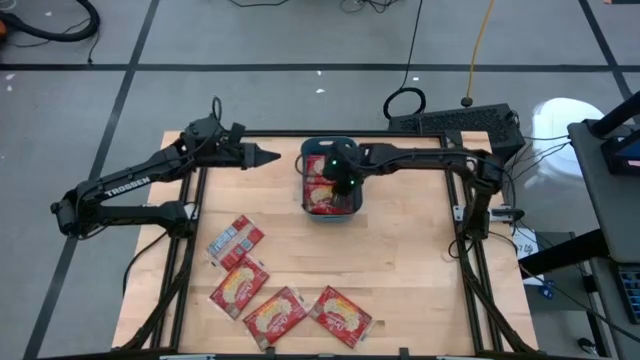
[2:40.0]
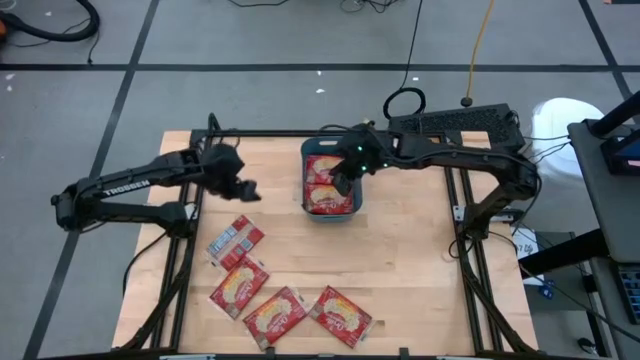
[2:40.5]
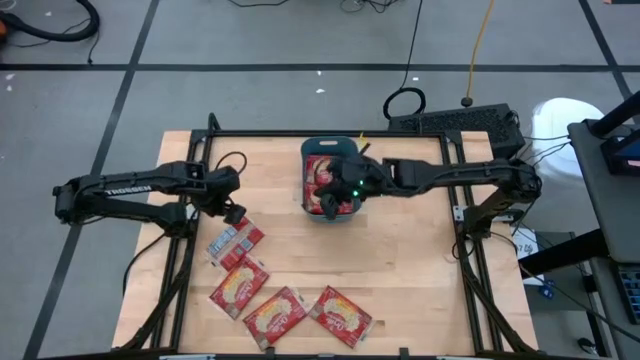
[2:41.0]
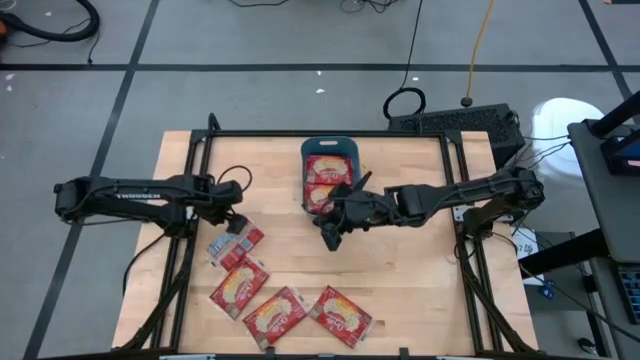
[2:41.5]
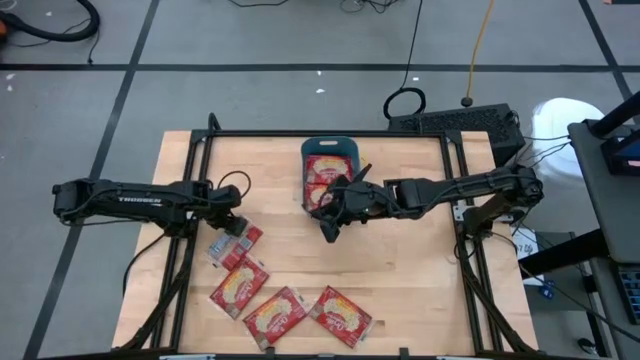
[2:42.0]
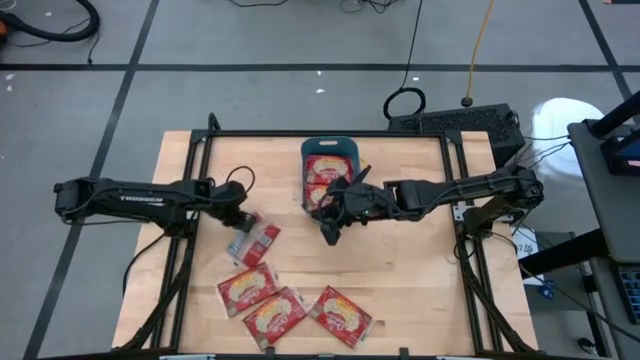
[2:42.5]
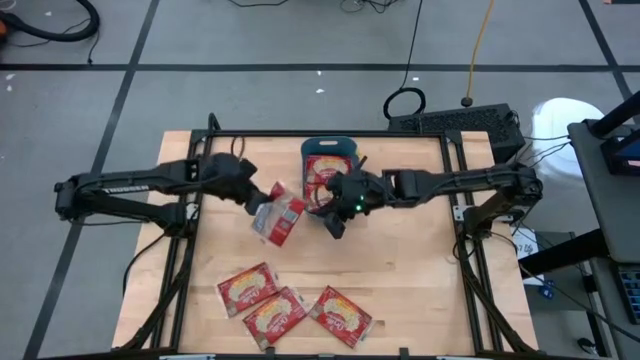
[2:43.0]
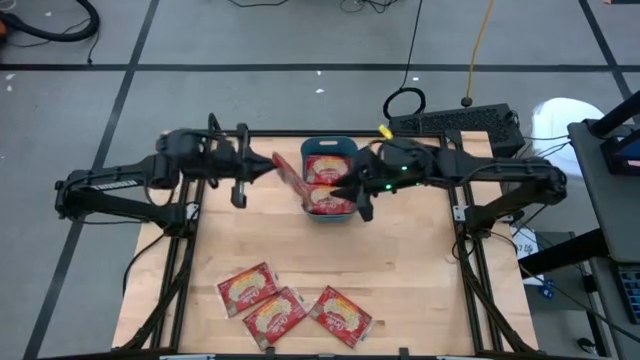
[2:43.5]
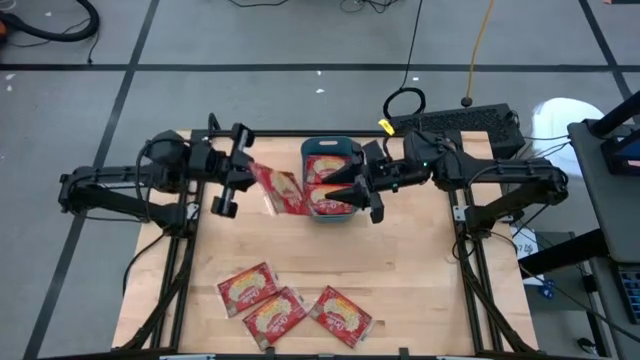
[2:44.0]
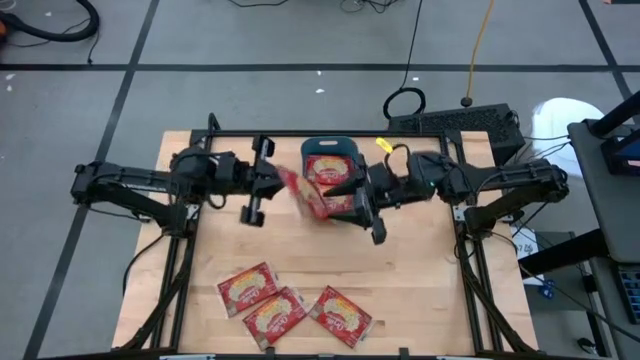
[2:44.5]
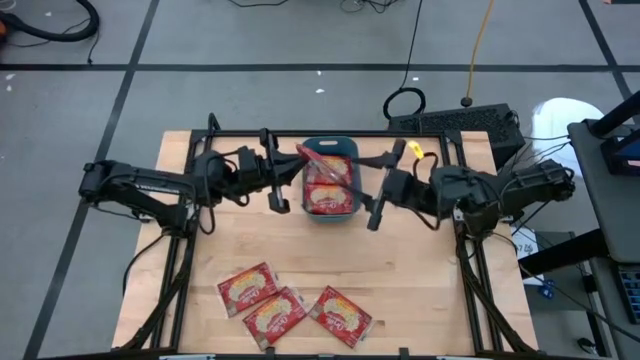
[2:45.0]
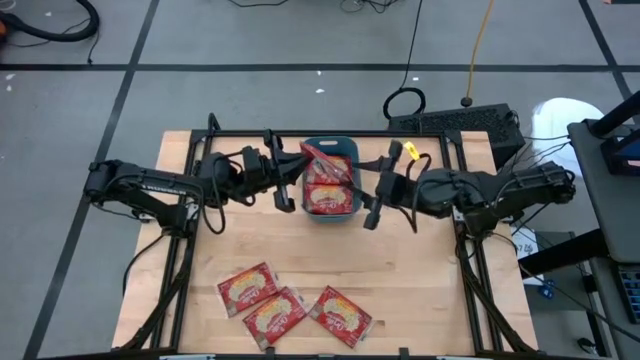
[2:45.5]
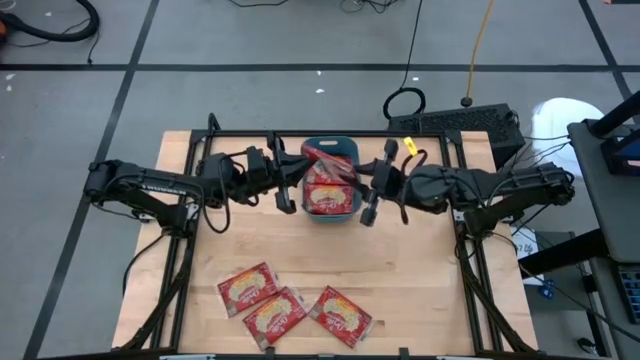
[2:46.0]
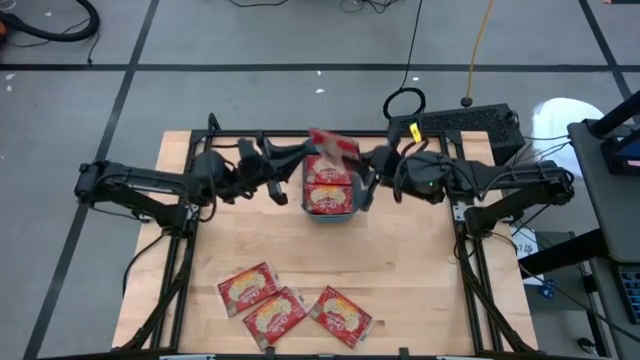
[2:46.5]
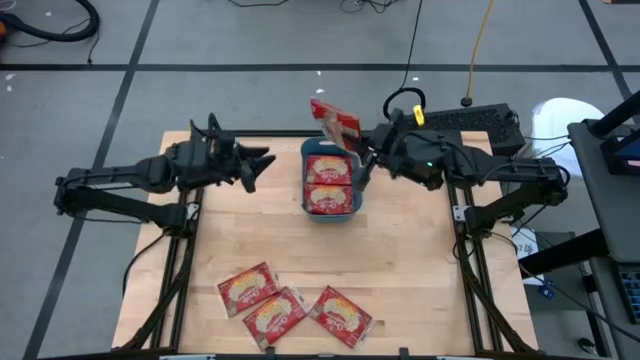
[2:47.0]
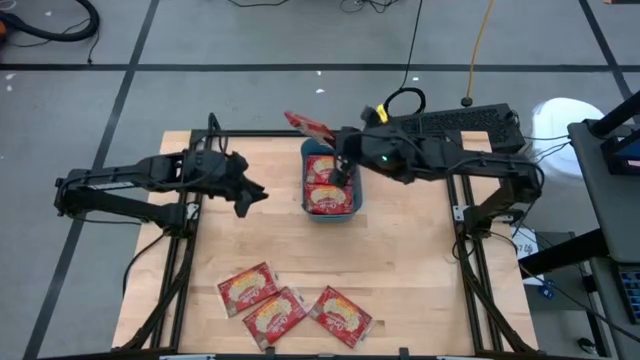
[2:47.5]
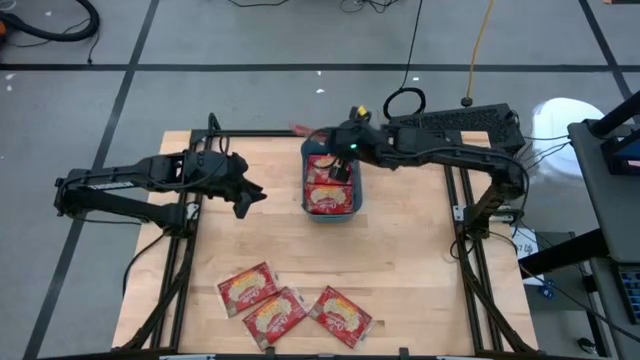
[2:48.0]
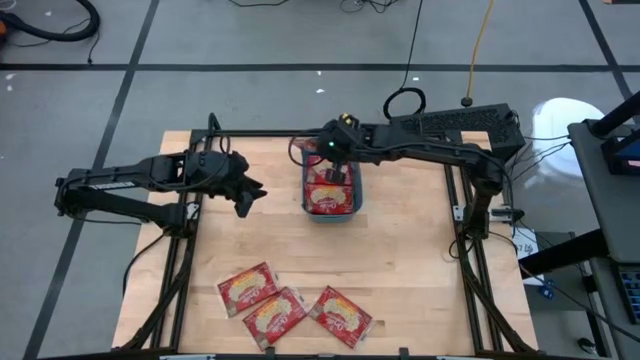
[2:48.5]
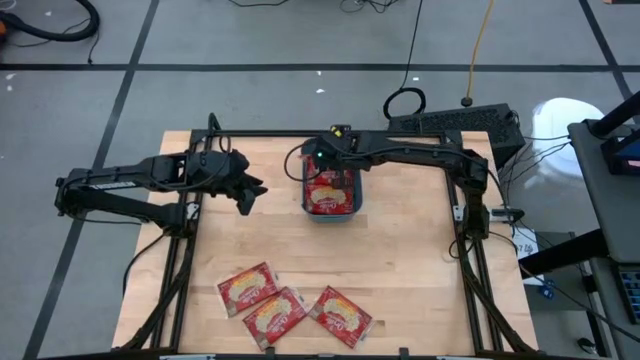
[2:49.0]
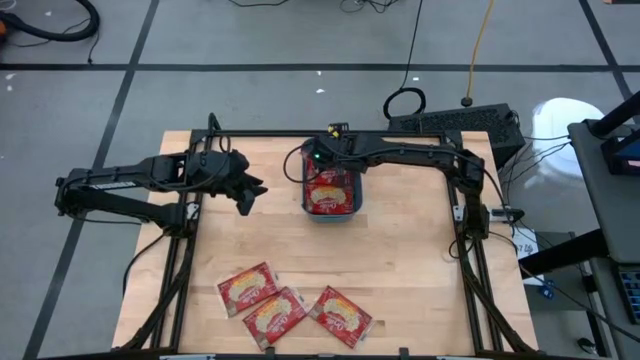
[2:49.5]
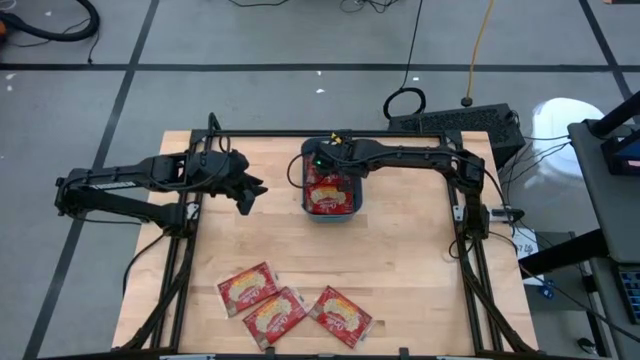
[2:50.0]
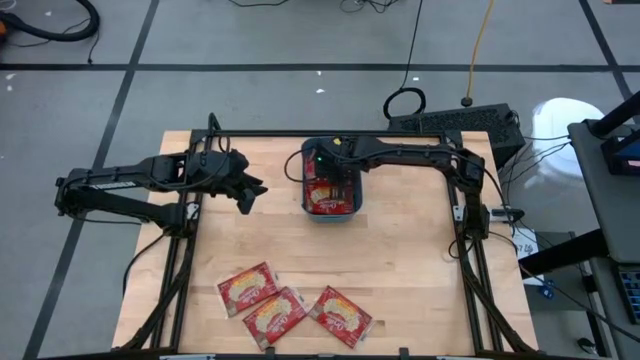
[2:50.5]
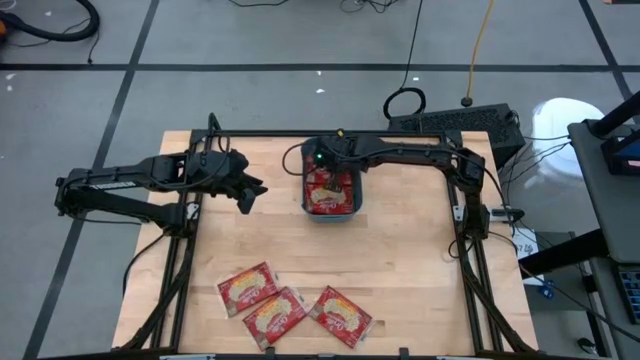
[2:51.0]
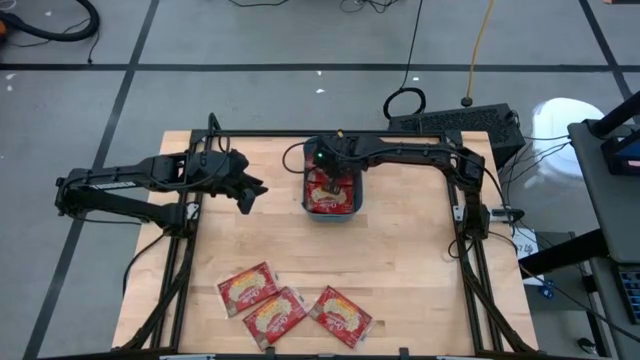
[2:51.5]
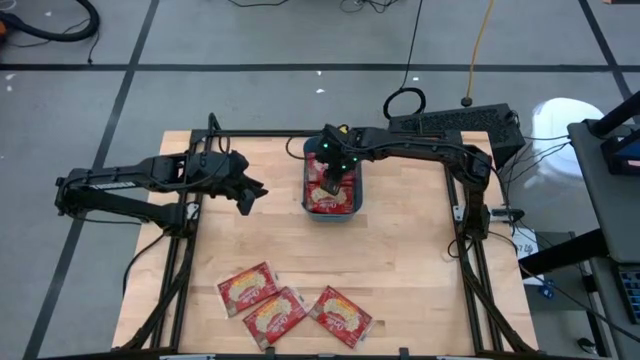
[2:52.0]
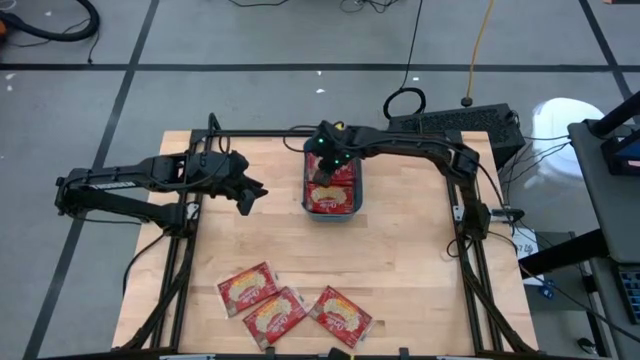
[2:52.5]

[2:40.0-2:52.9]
Task: Sort popcorn bags into baskets
Put the red popcorn bag into the blue bin

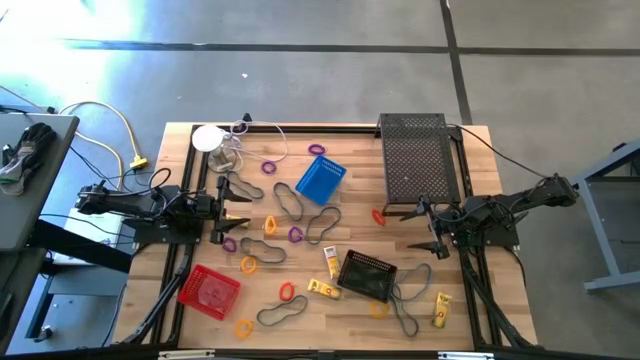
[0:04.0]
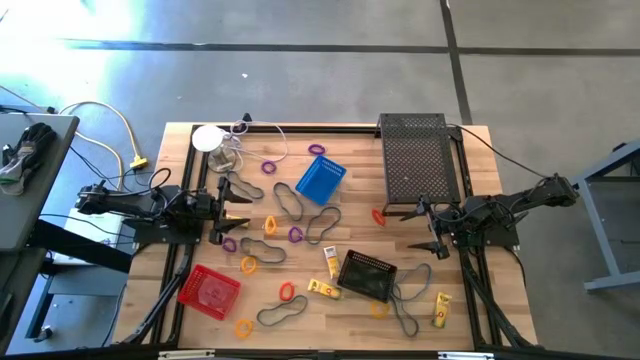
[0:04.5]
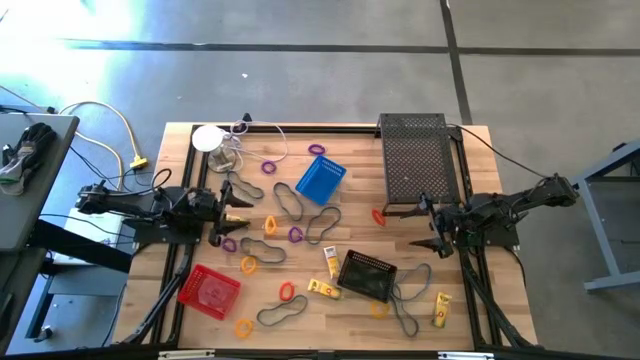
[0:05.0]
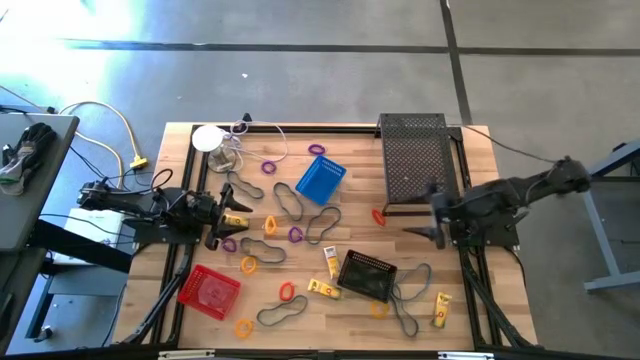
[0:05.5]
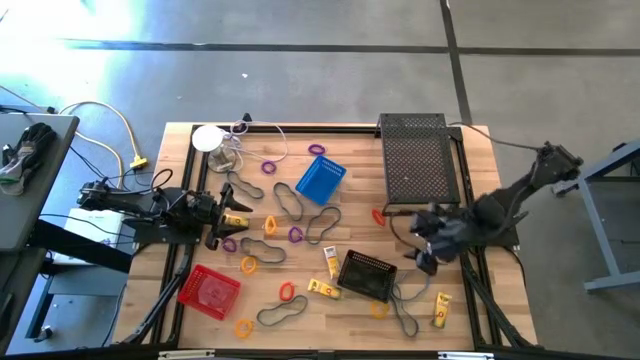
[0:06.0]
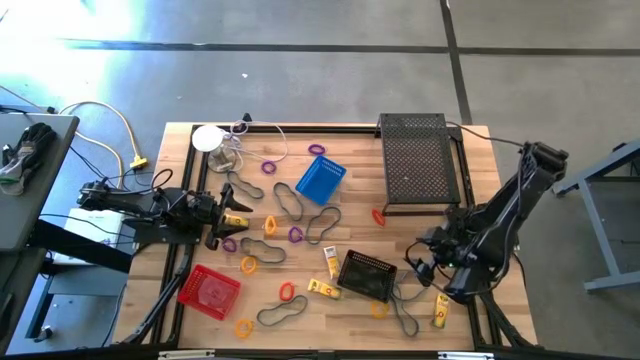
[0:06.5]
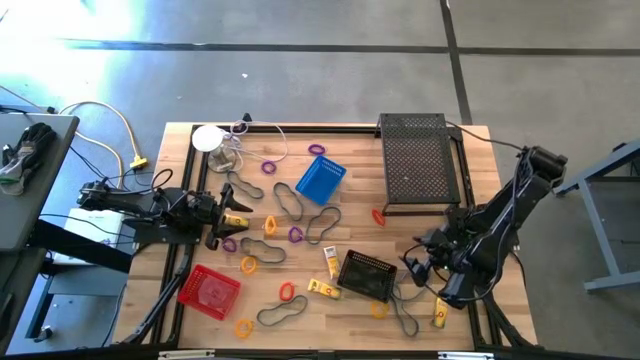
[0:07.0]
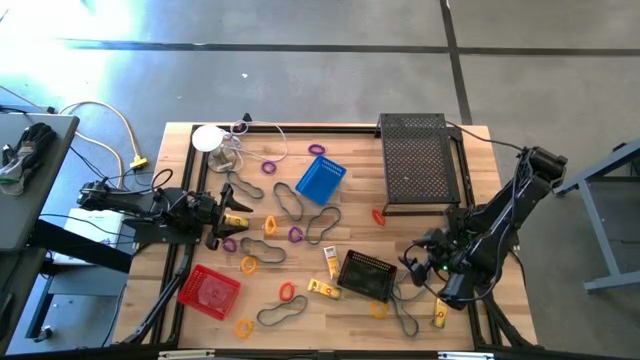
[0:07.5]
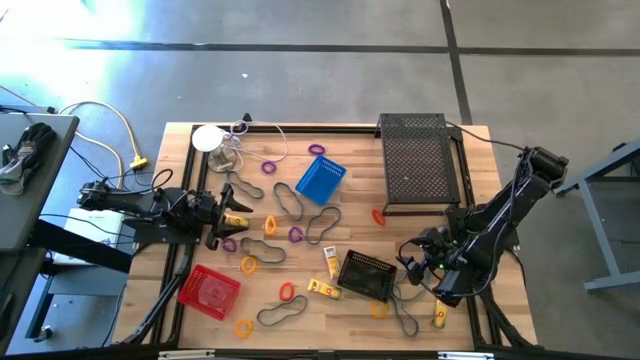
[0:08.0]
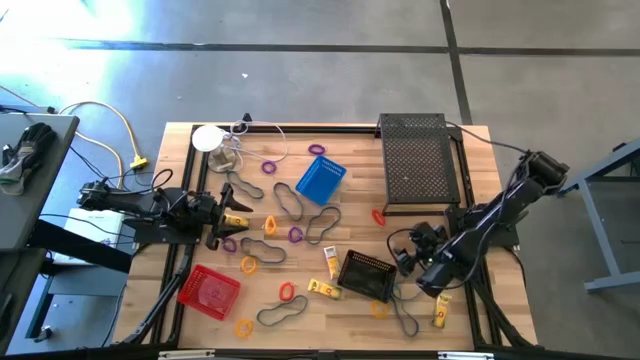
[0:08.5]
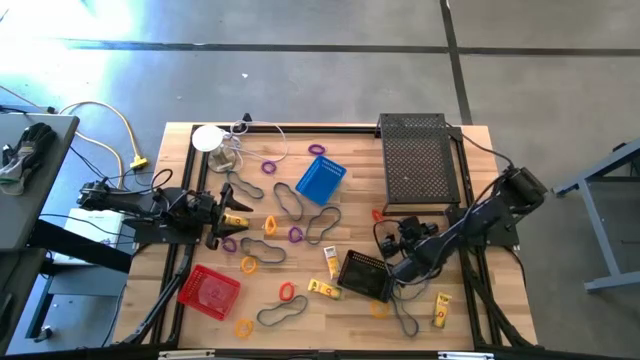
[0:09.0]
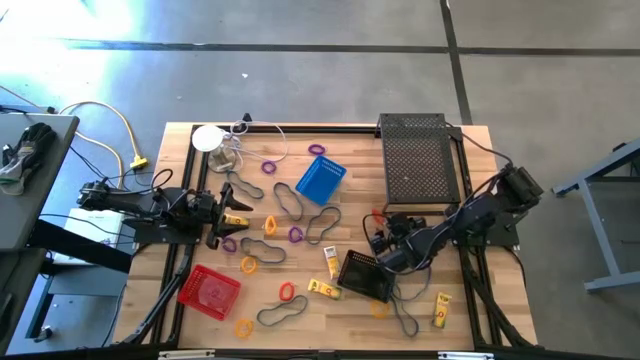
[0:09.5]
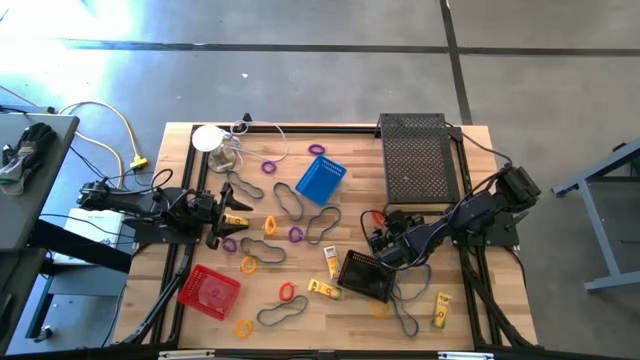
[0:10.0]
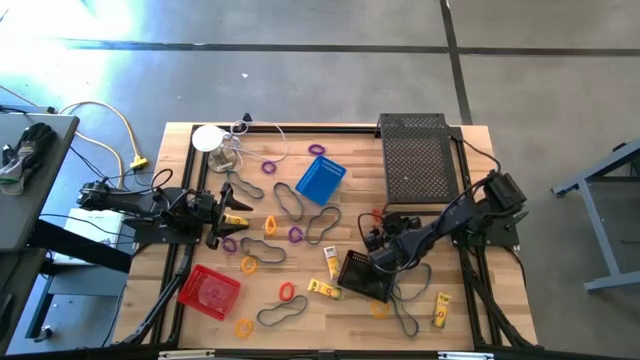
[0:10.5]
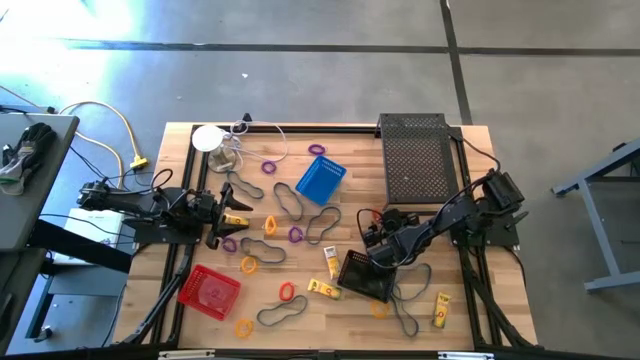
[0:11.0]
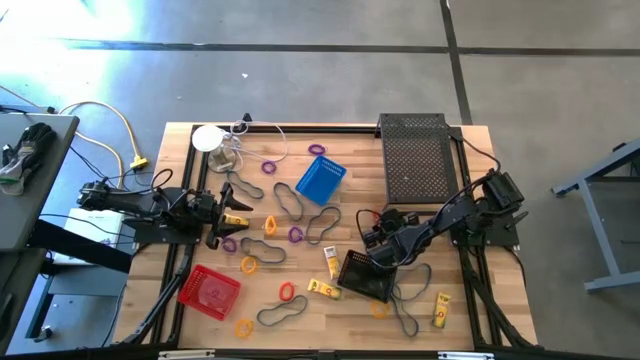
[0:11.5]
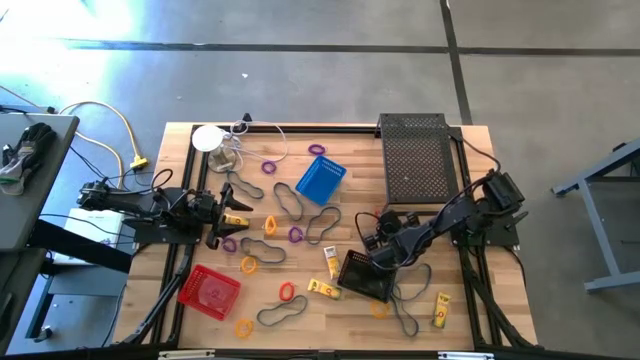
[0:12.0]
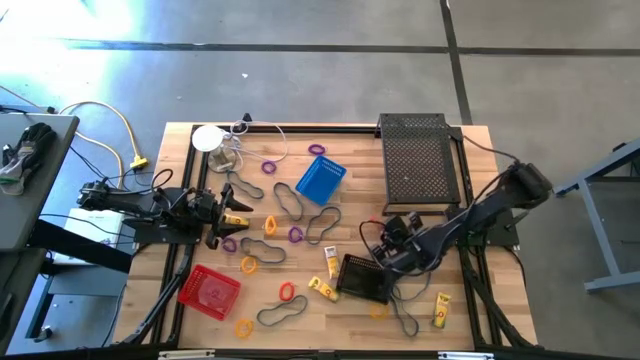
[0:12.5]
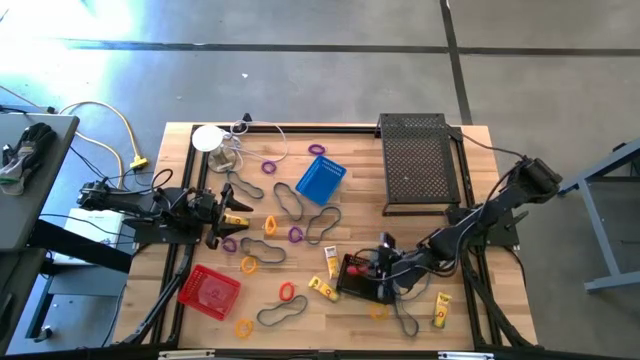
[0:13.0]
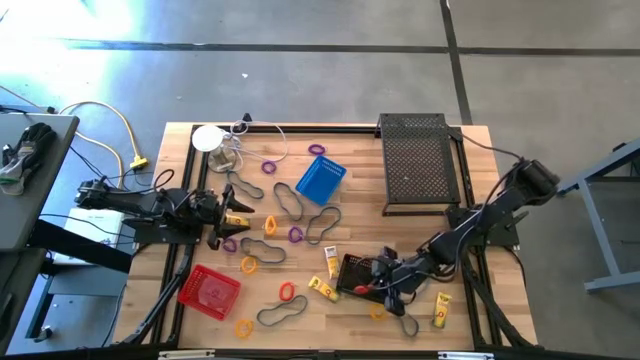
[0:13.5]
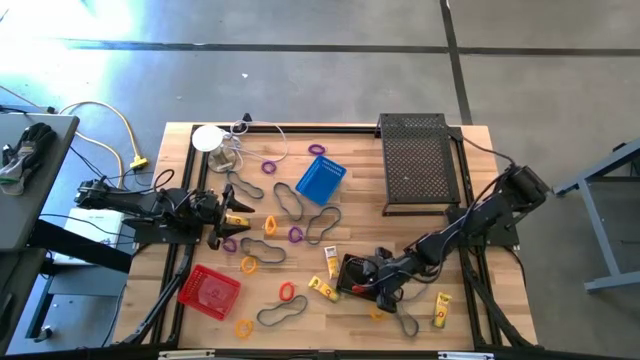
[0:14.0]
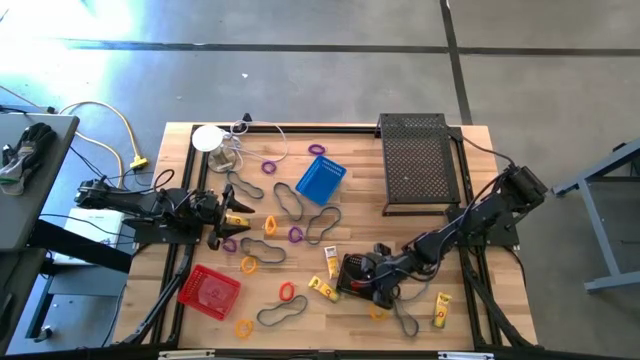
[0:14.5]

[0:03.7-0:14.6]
Task: Pick & Place Office Desk Supplies
Put the top orange wrist coil keychain into the black bin
